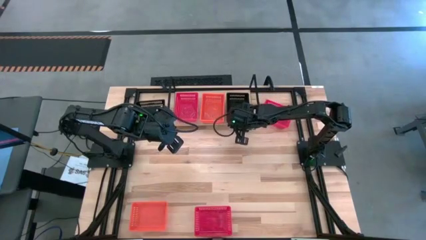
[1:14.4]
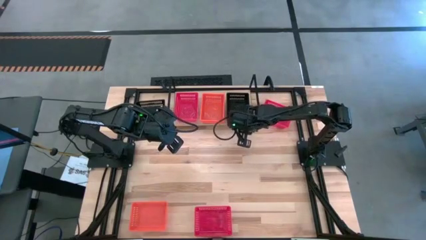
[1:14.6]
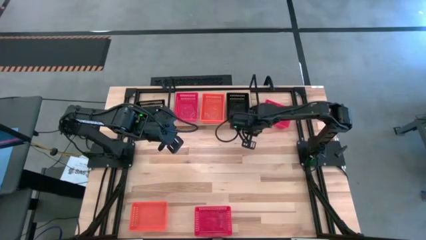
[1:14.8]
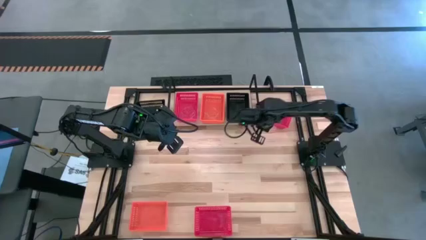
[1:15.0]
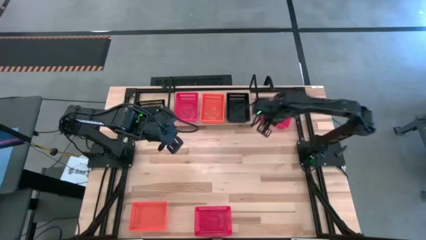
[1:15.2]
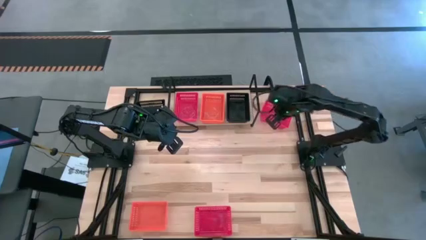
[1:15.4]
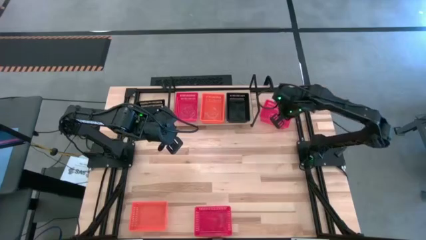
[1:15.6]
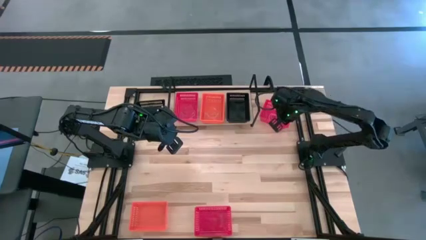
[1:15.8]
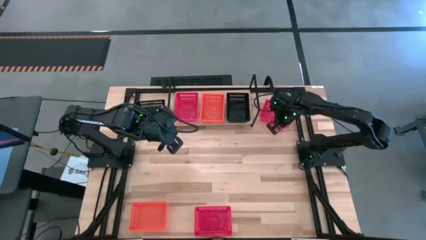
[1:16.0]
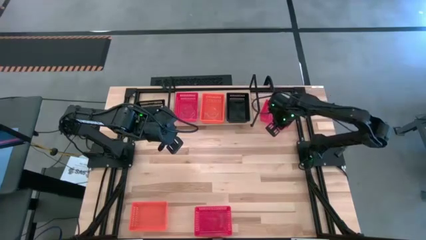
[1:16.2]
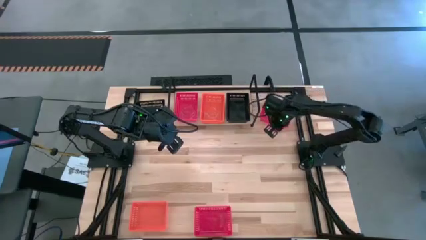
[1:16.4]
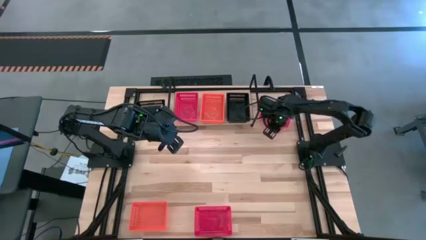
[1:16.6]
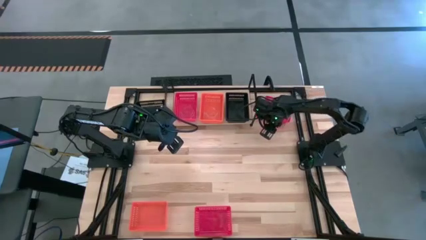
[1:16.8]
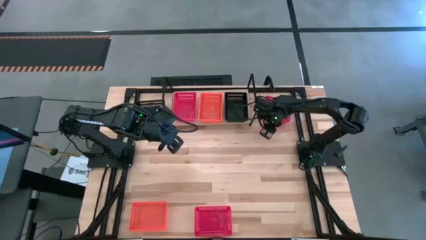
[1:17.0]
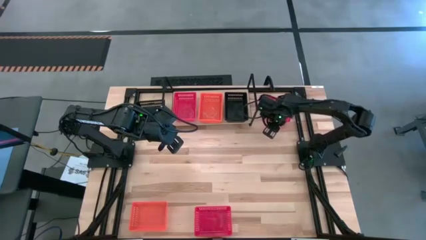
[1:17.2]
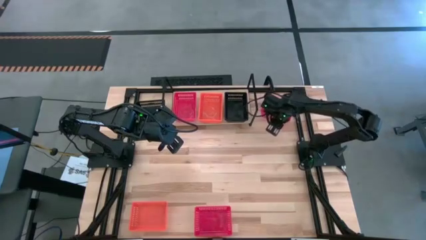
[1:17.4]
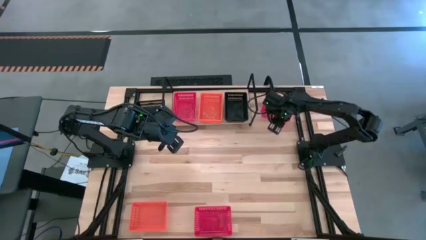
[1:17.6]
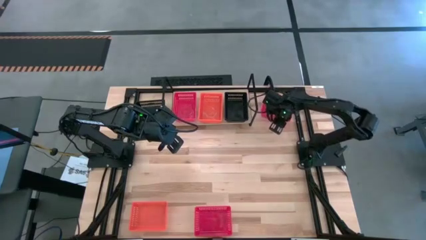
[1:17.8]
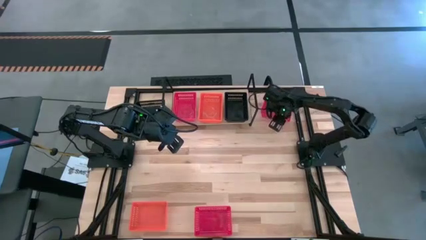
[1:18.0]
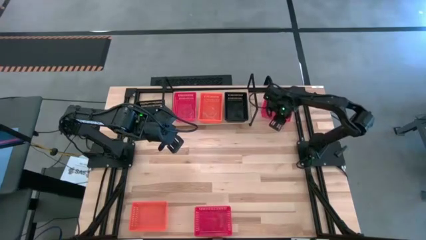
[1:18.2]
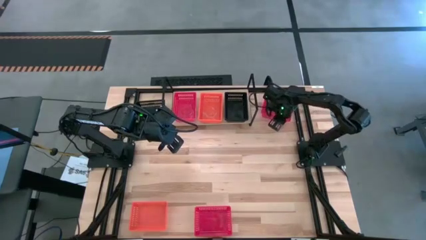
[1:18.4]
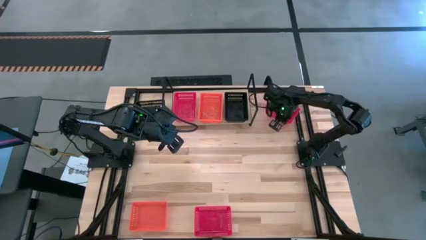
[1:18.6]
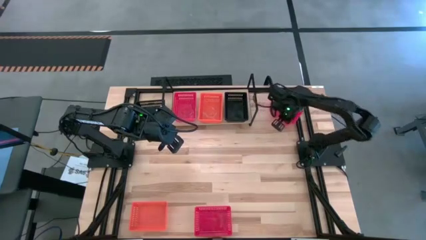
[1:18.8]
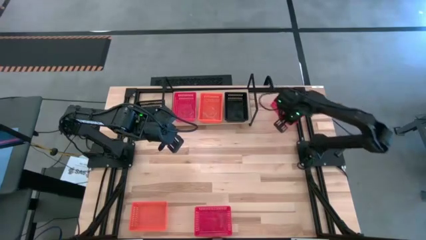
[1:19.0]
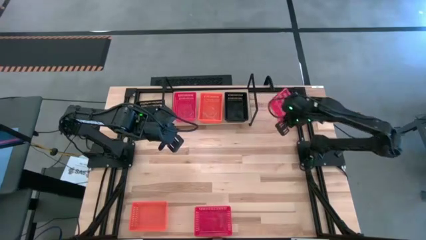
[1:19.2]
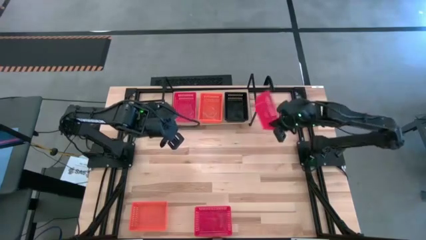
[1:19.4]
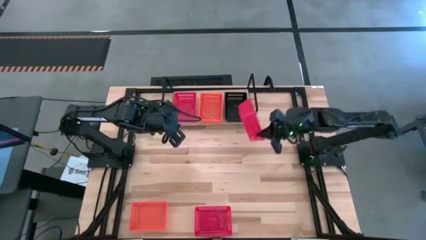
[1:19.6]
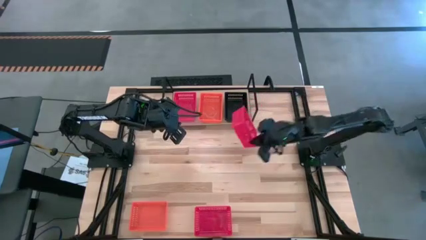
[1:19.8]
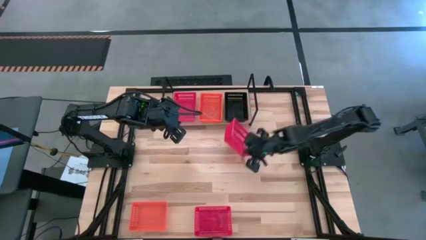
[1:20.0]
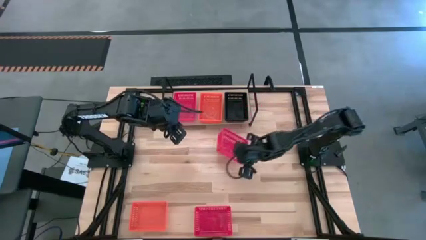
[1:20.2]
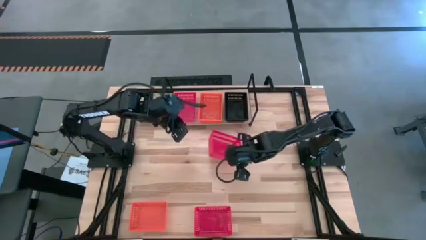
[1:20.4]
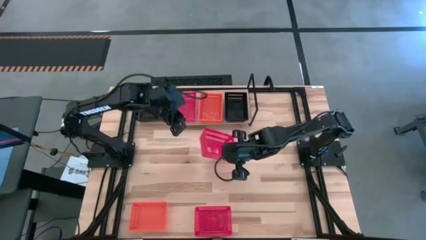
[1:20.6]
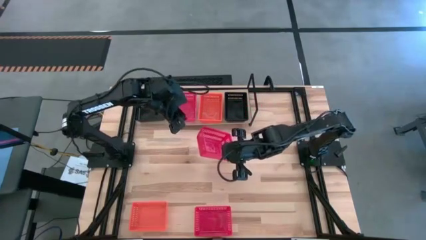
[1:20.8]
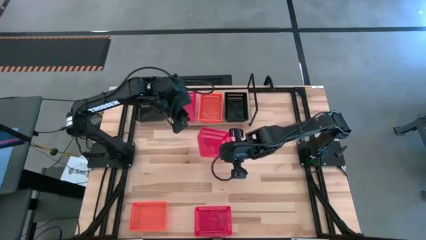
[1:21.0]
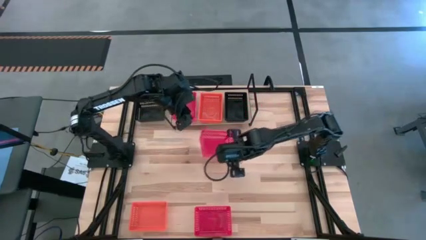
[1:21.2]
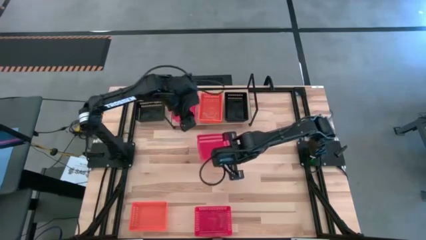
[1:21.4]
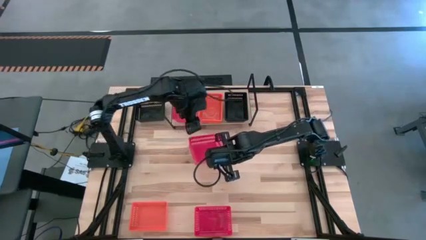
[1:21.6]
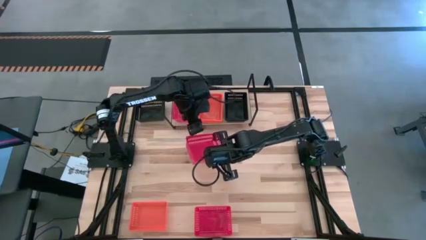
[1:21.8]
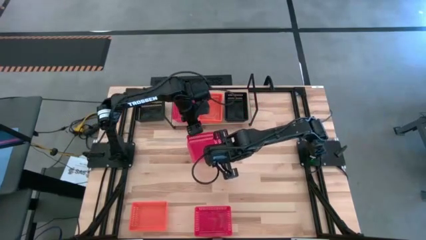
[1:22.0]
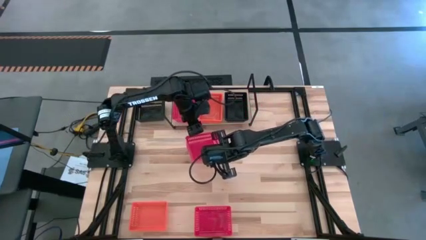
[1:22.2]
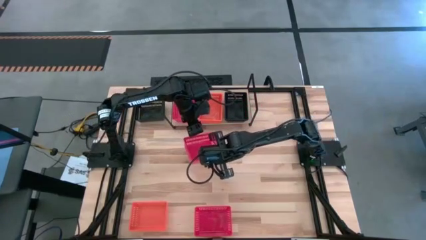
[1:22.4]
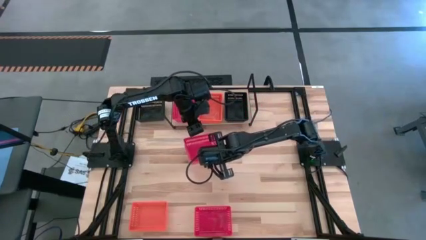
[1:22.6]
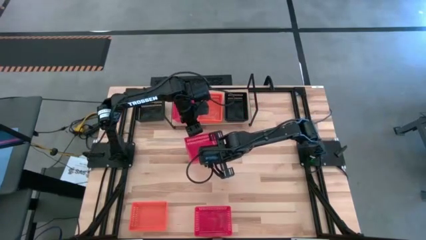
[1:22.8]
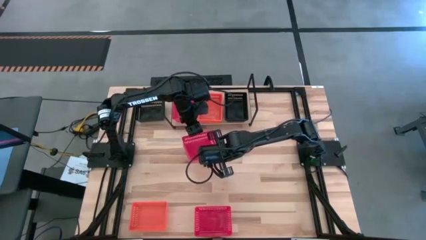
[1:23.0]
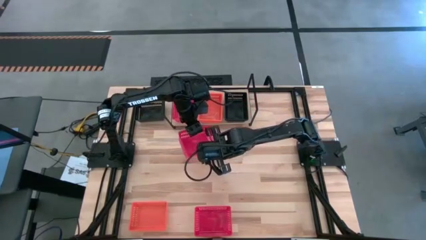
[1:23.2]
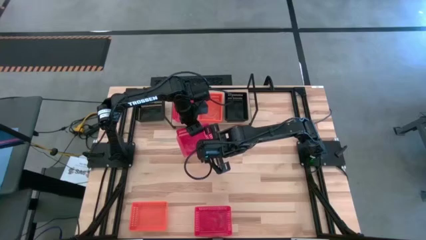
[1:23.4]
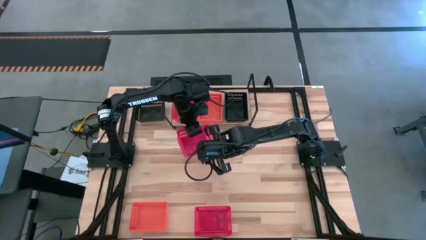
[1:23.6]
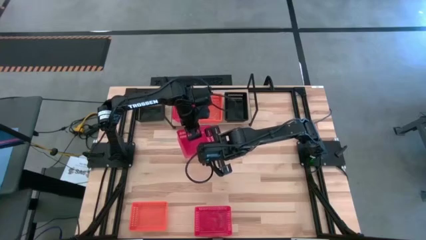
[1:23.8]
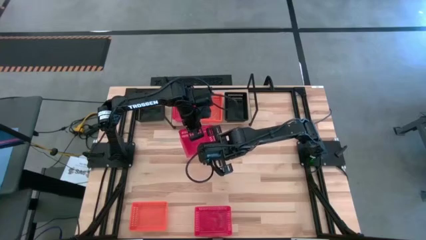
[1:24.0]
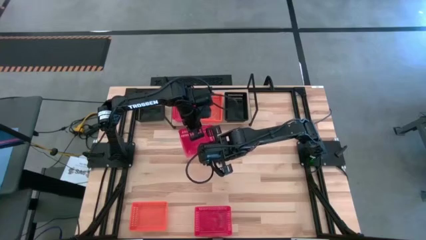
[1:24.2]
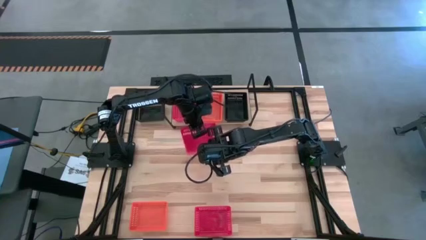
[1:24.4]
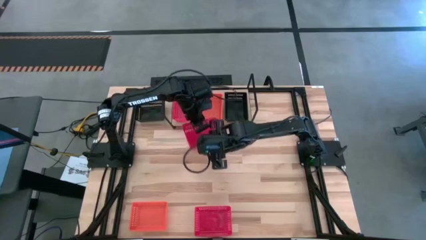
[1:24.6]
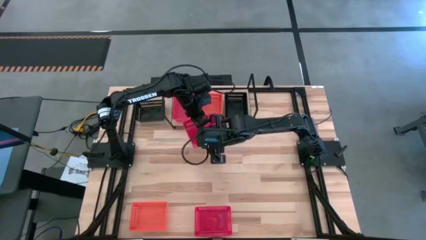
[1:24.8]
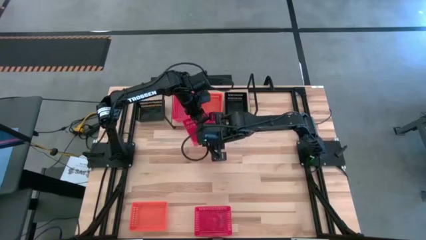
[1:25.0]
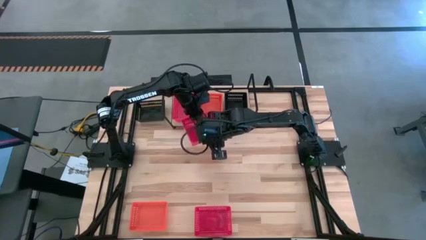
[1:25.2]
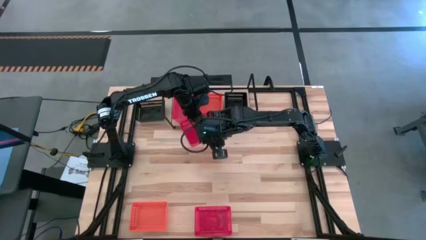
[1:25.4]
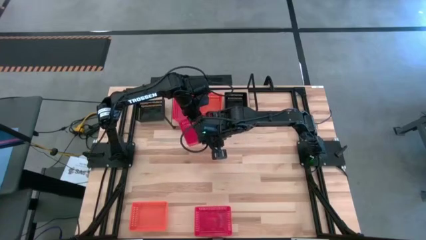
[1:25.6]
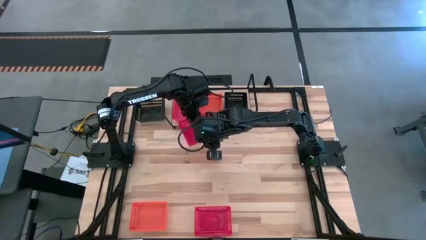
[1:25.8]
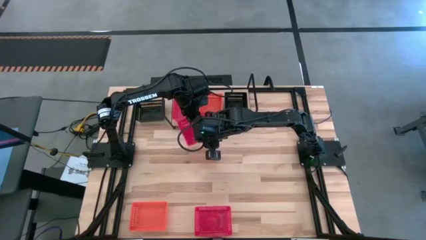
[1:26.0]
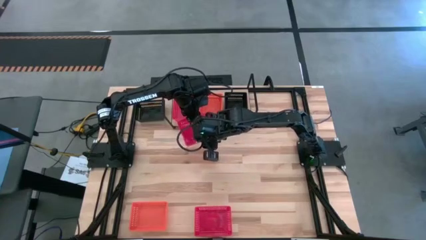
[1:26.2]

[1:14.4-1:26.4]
Task: Stack baskets on shelf by color
Stack the top red bin on top of the red bin on the shelf
